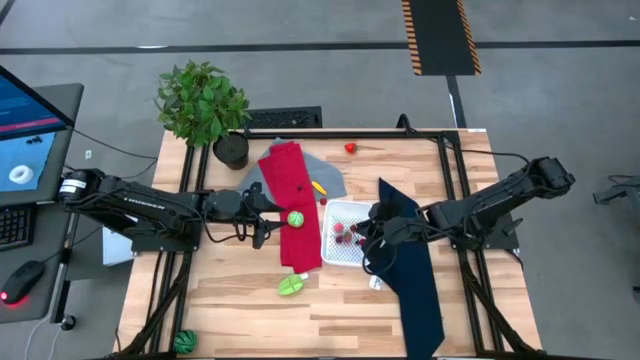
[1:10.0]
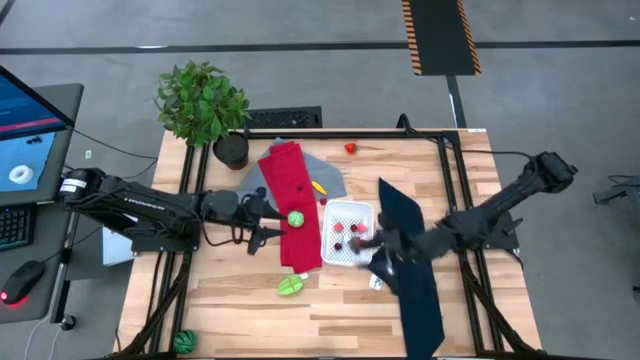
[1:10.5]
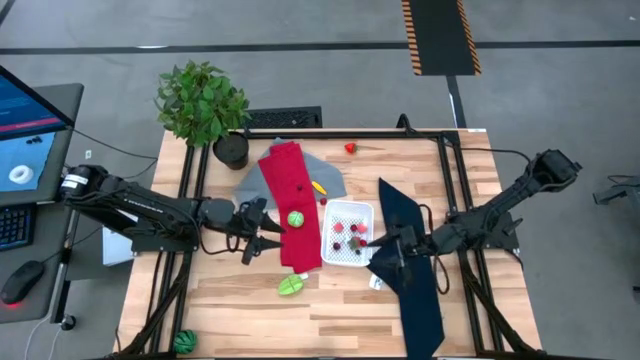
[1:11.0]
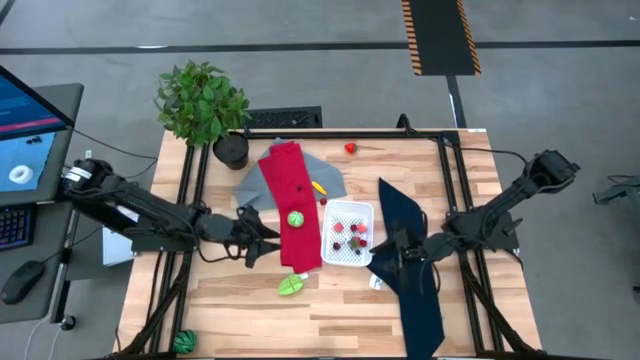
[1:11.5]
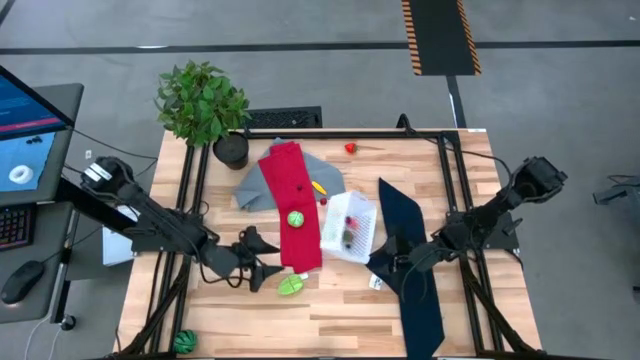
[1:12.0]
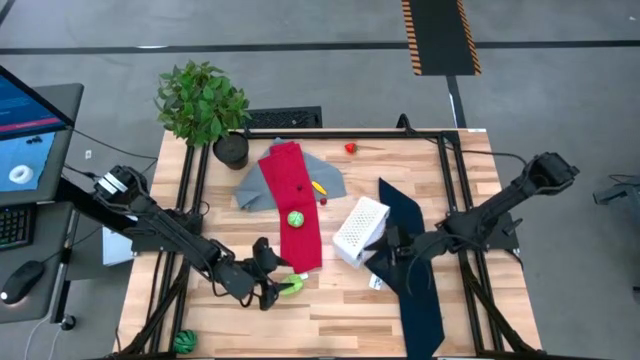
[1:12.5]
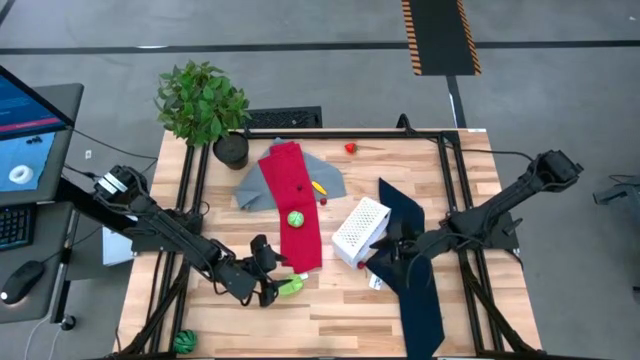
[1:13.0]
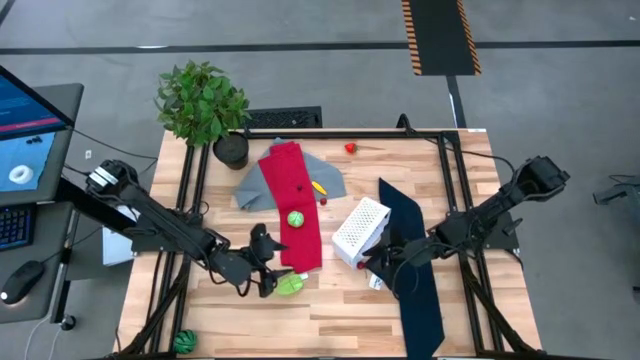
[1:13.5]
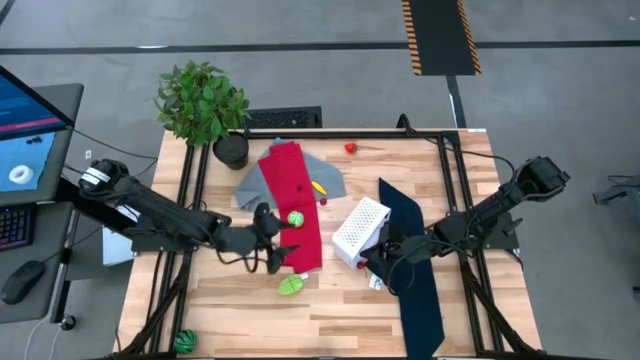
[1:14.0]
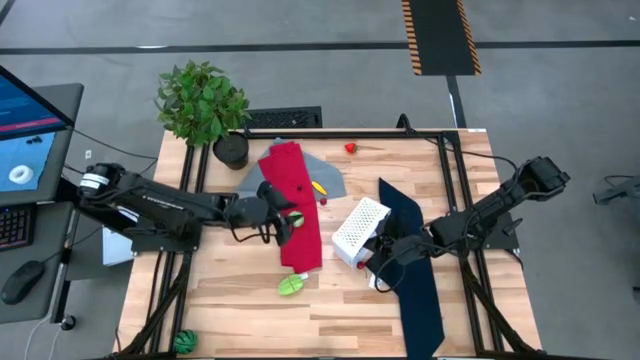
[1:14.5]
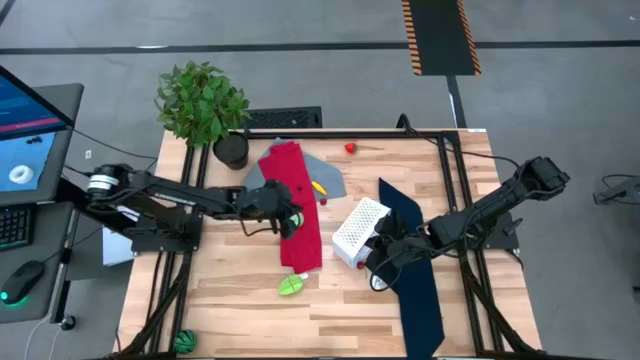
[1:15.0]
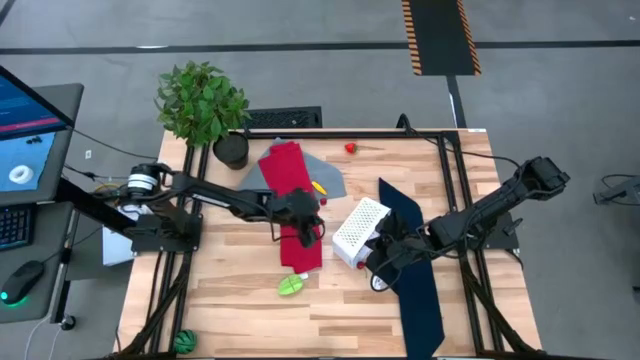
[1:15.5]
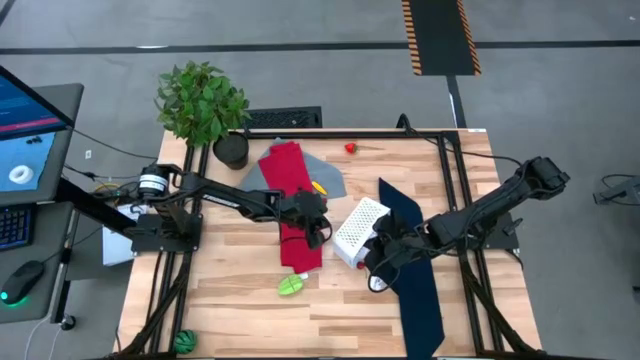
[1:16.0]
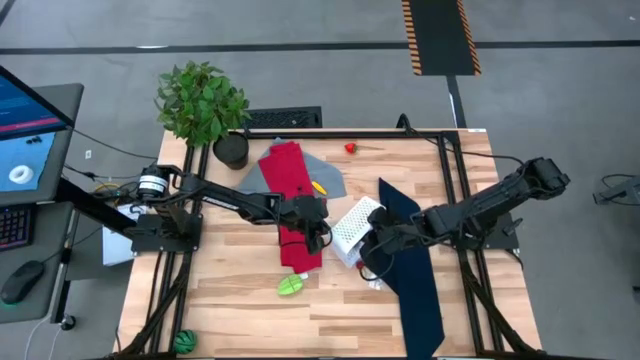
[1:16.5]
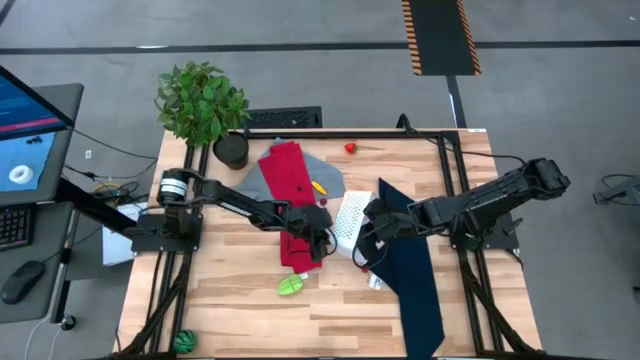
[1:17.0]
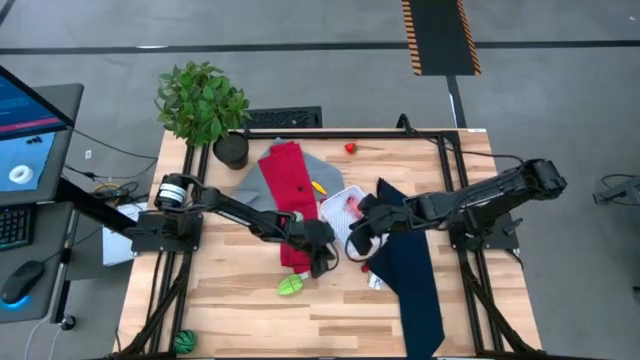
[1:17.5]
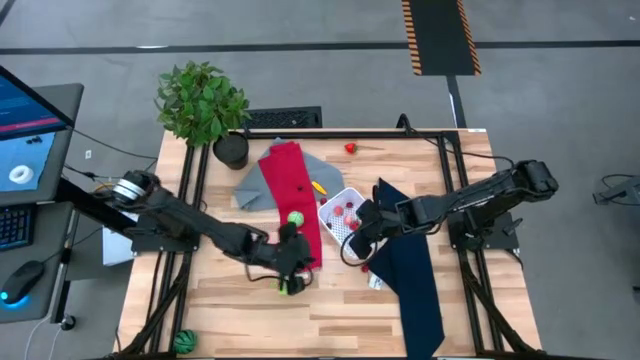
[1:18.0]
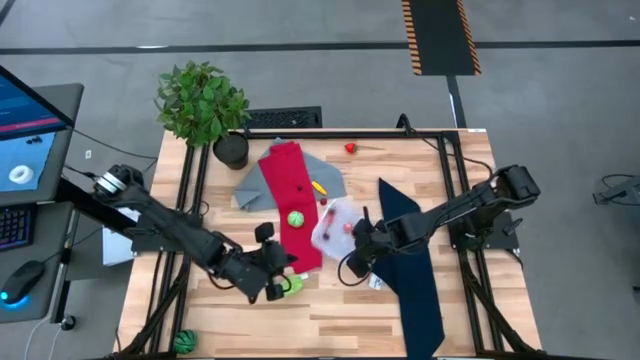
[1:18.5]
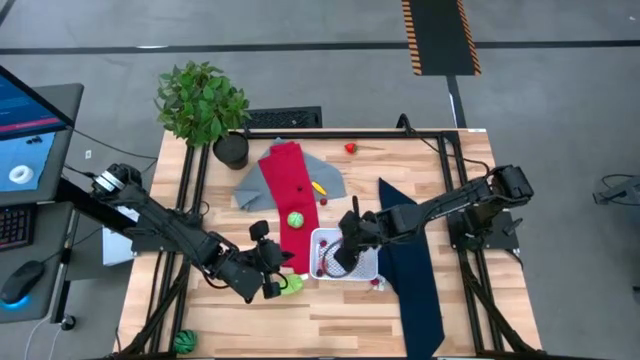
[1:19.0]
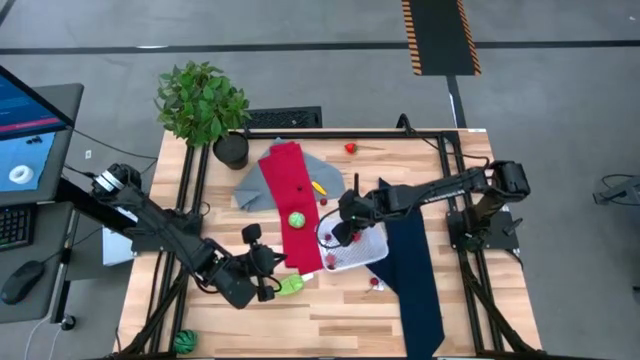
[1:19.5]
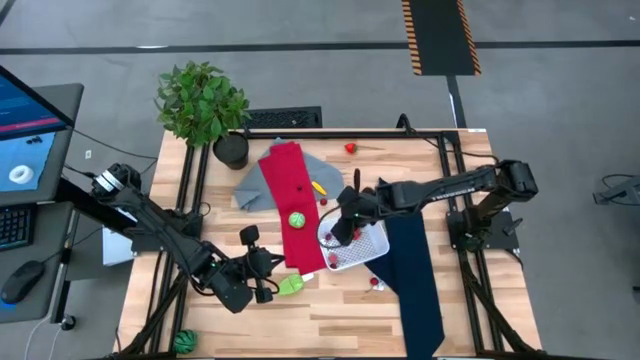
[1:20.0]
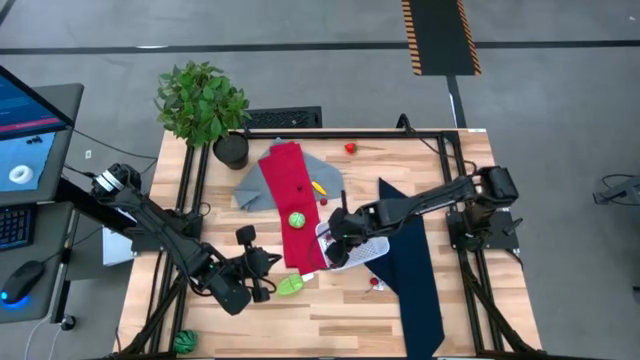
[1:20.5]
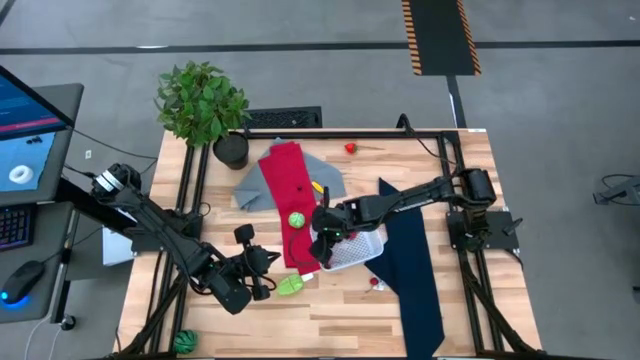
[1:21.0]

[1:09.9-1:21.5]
Task: Pick and placing Produce into tupperware
Adjust the white bin

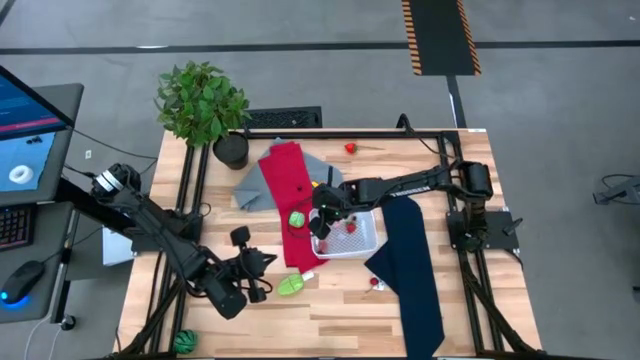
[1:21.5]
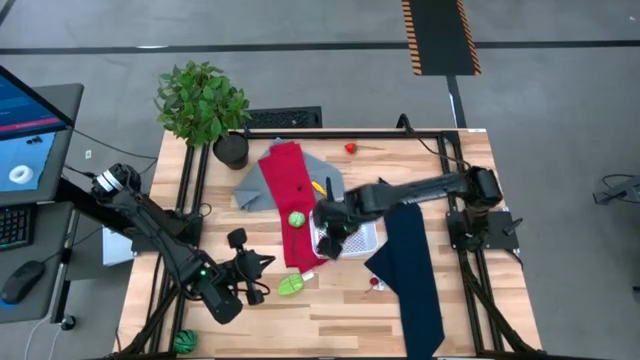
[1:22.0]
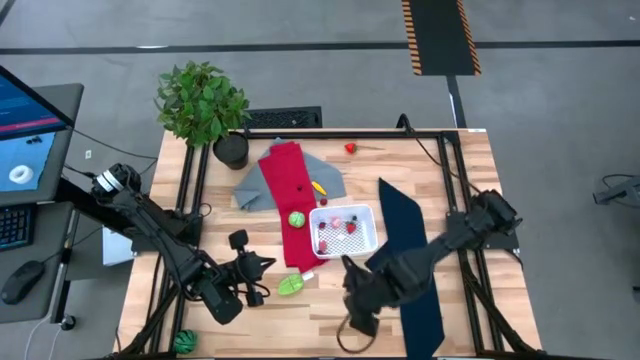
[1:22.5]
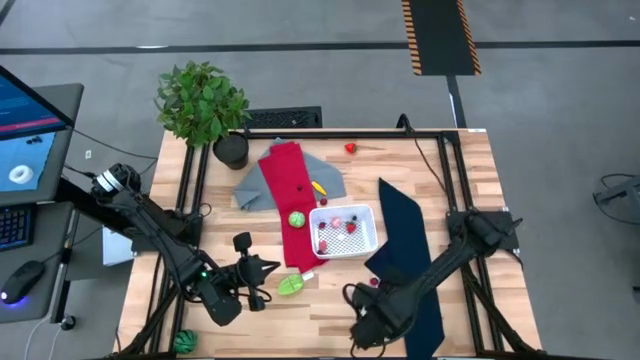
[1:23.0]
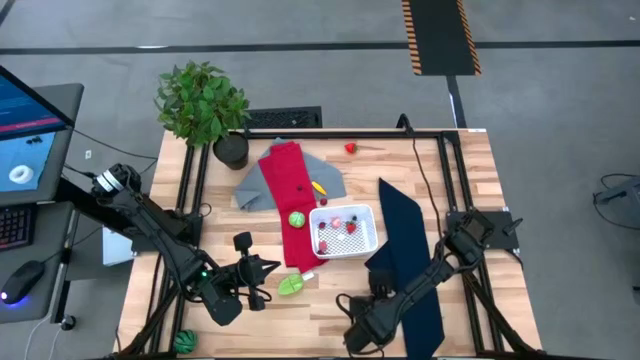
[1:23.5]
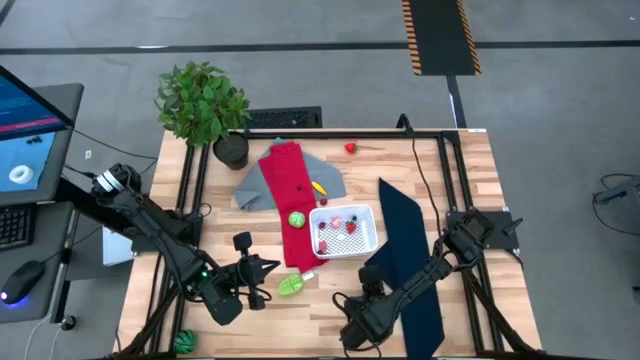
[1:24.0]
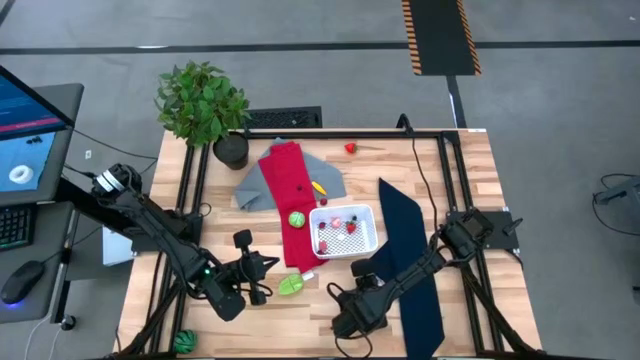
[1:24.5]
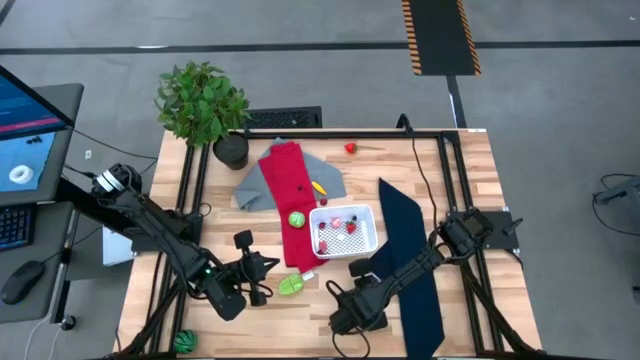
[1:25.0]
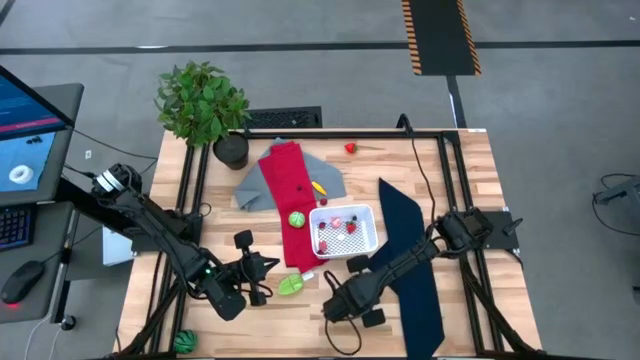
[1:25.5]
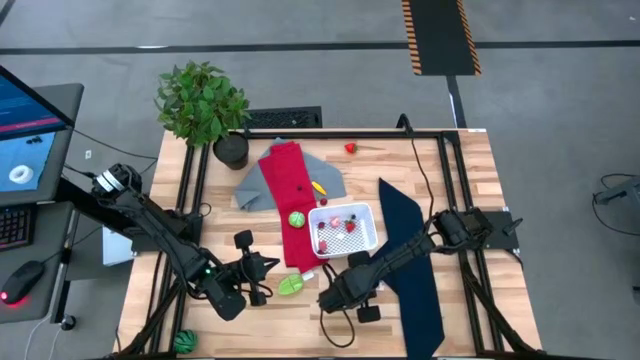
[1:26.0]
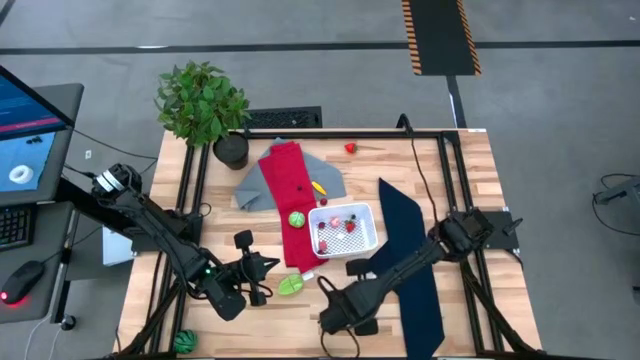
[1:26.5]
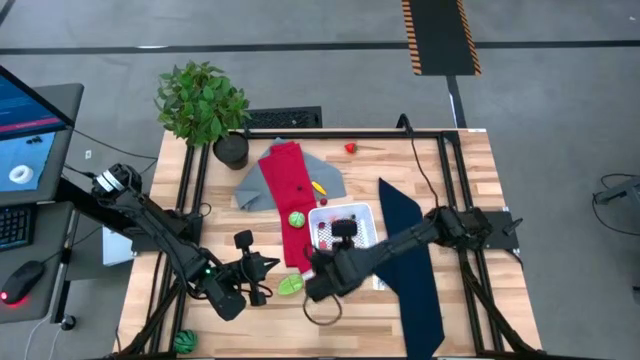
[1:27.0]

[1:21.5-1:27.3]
Put the cherry into the white bin

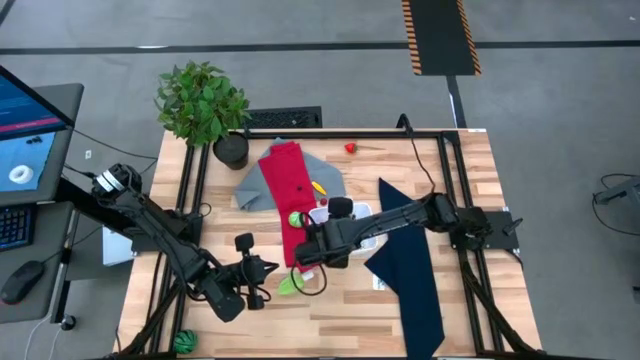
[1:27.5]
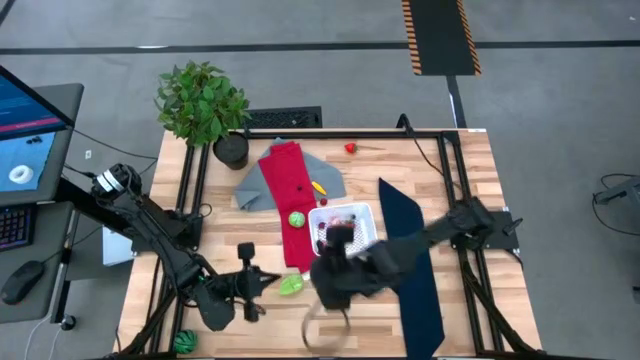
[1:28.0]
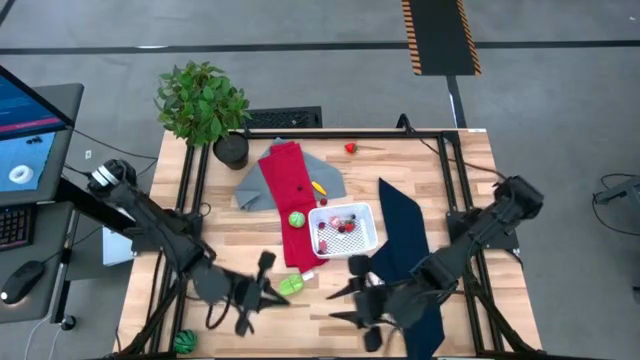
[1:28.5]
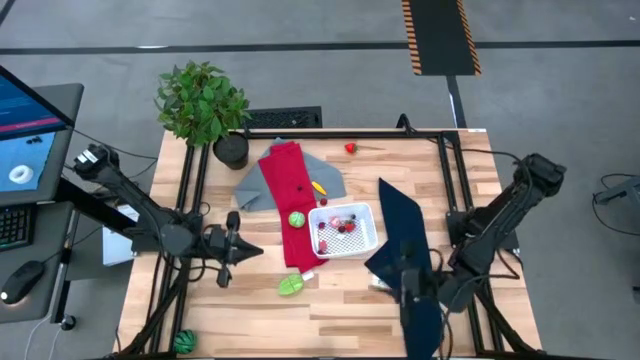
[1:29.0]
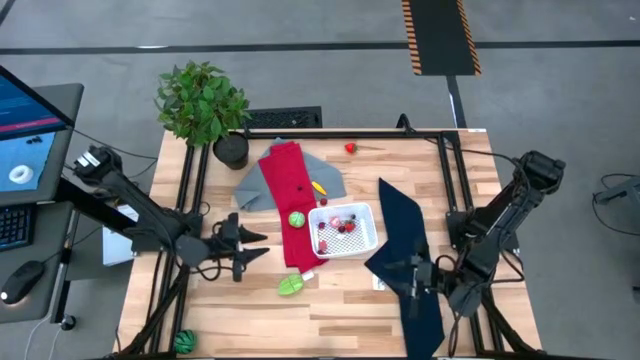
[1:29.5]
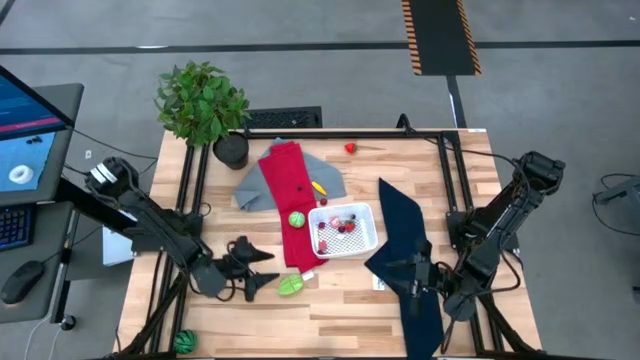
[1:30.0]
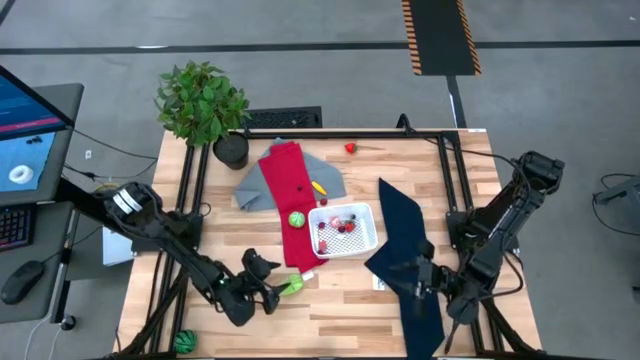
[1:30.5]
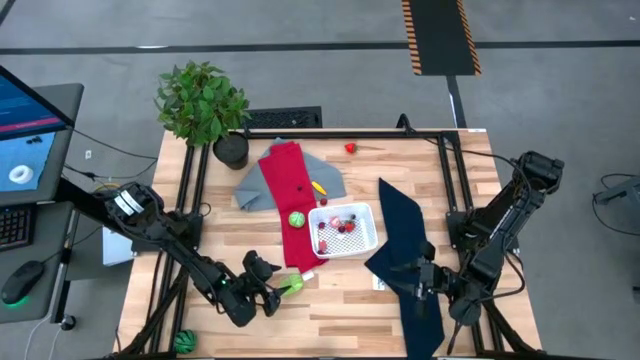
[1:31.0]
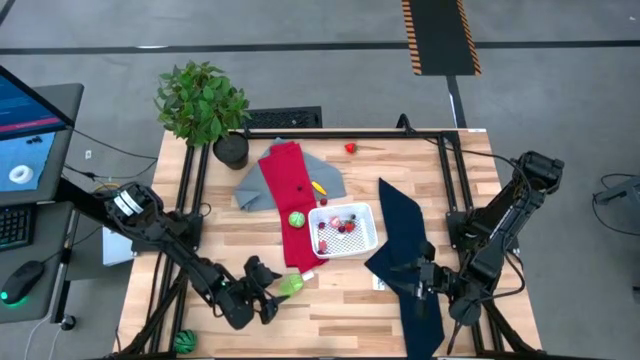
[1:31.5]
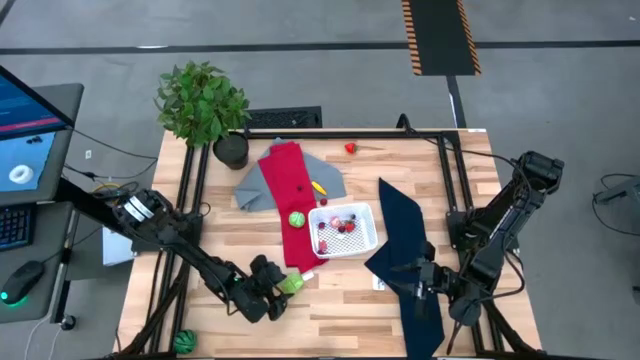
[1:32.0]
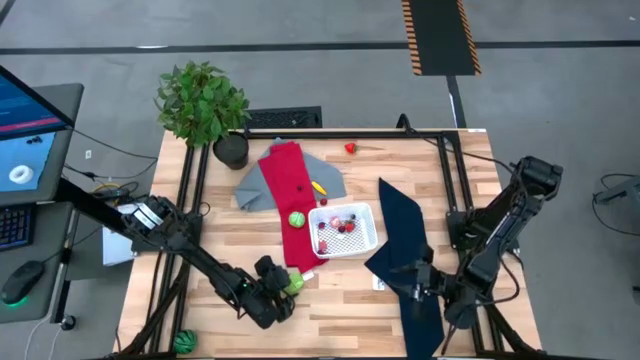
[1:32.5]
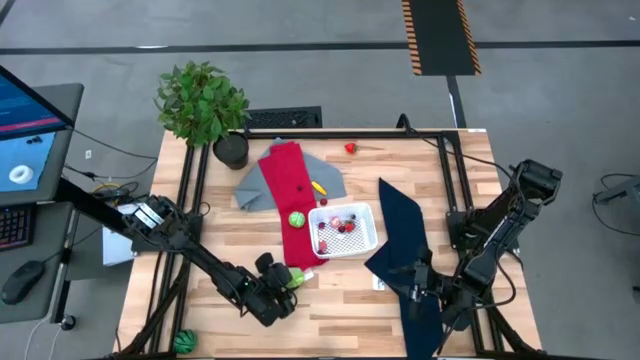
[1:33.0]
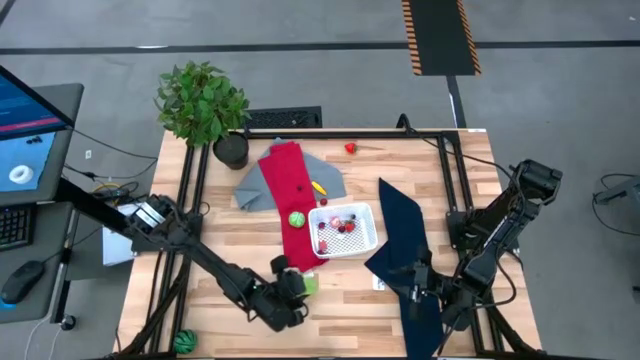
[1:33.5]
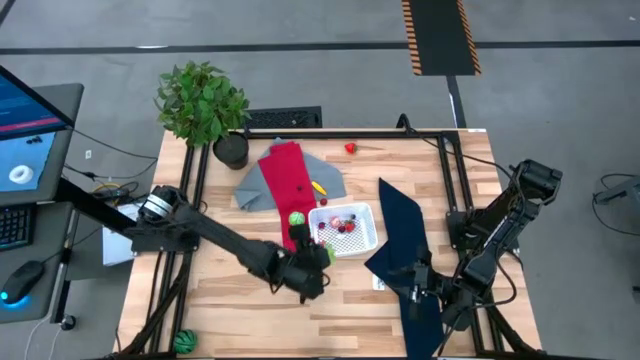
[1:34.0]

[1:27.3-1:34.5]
Put the starfruit into the white bin
